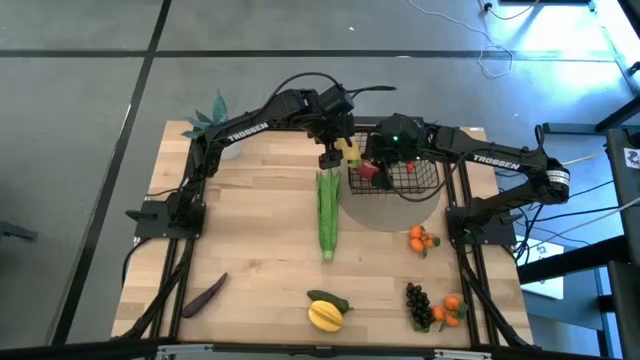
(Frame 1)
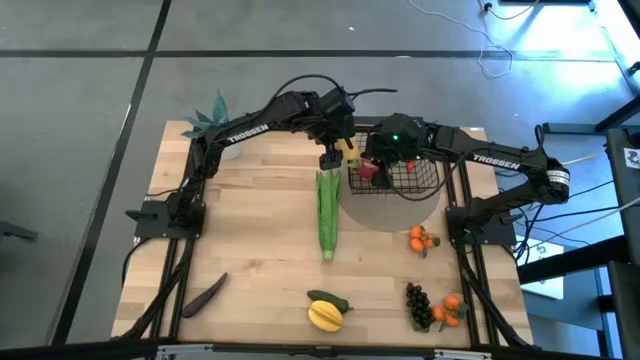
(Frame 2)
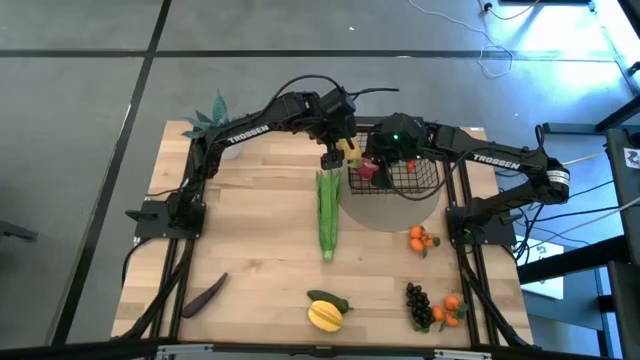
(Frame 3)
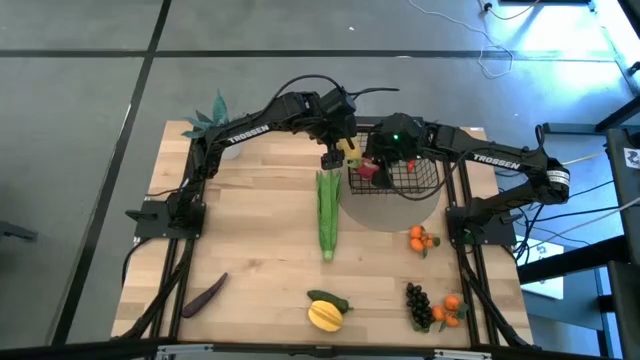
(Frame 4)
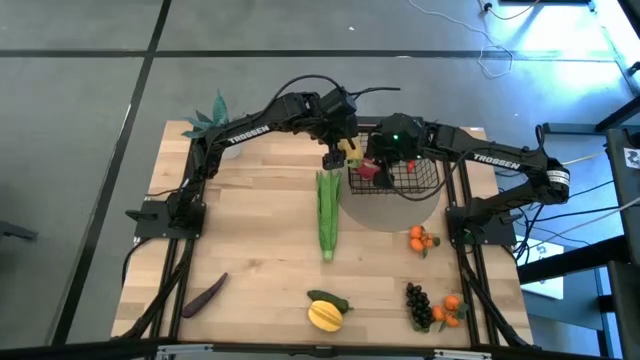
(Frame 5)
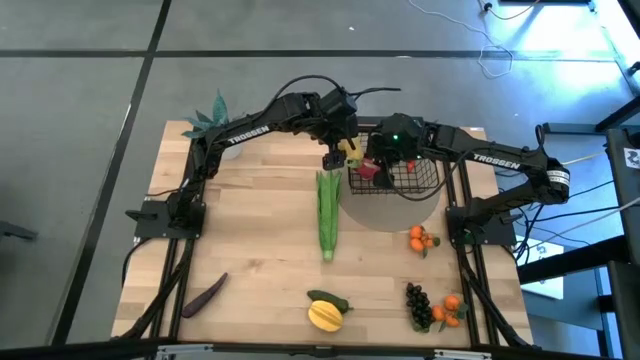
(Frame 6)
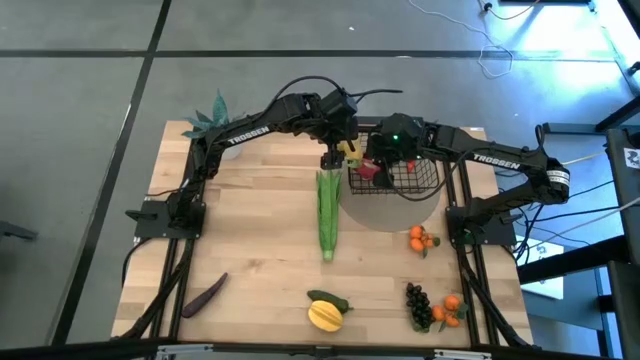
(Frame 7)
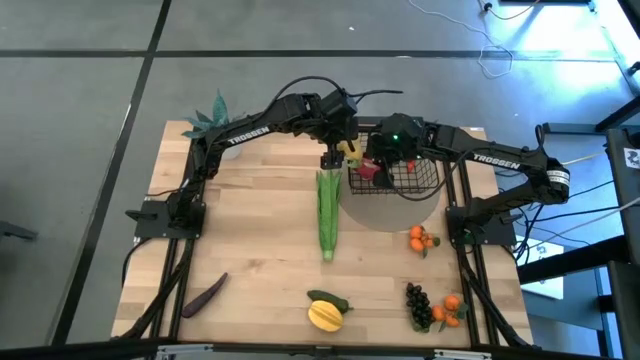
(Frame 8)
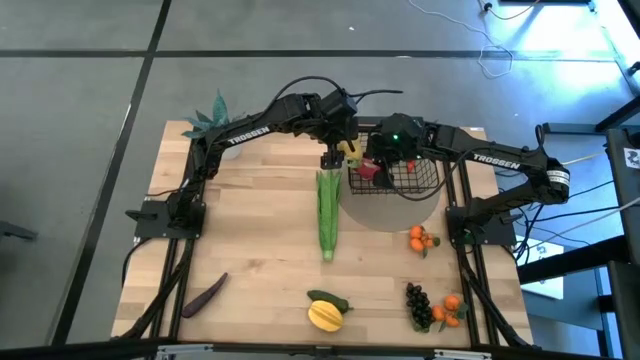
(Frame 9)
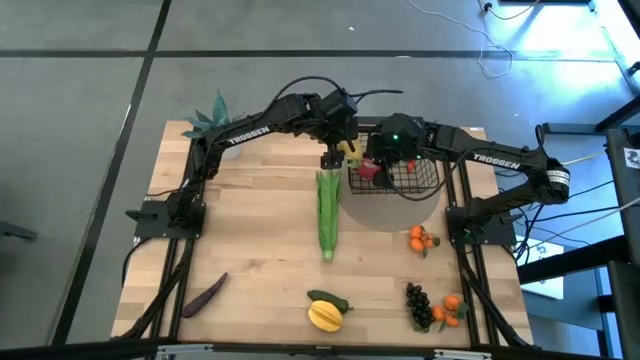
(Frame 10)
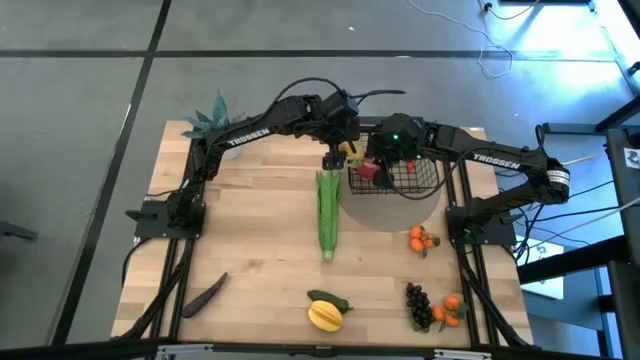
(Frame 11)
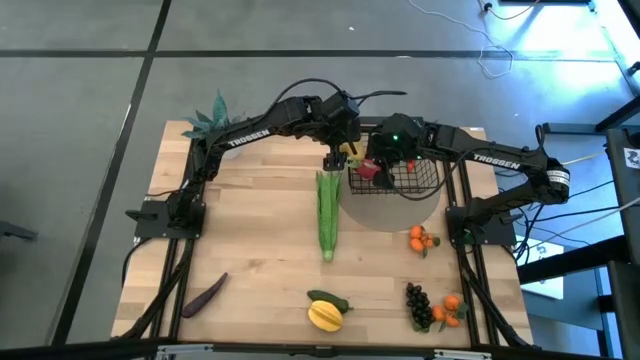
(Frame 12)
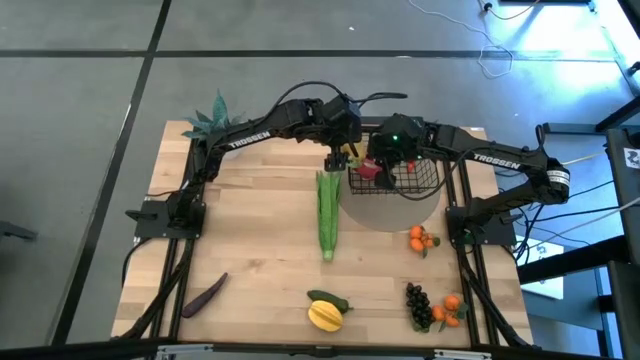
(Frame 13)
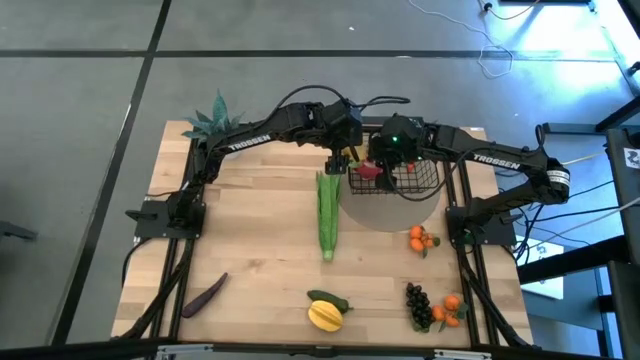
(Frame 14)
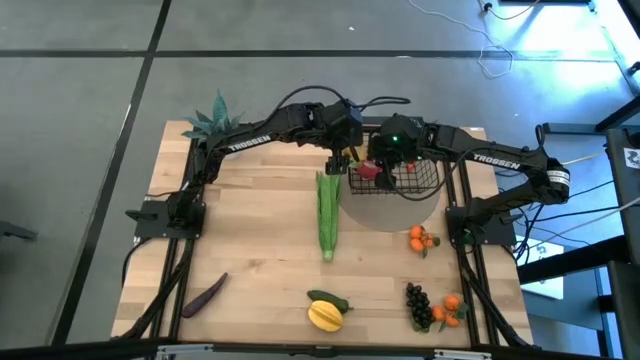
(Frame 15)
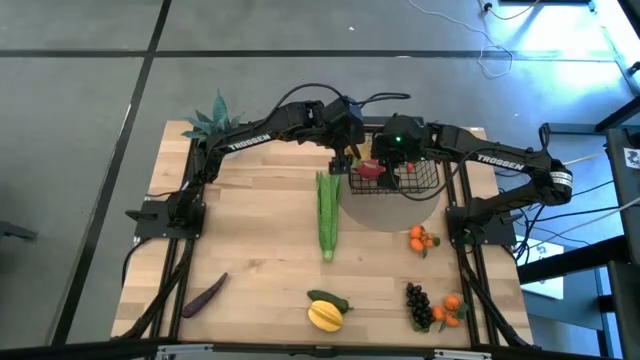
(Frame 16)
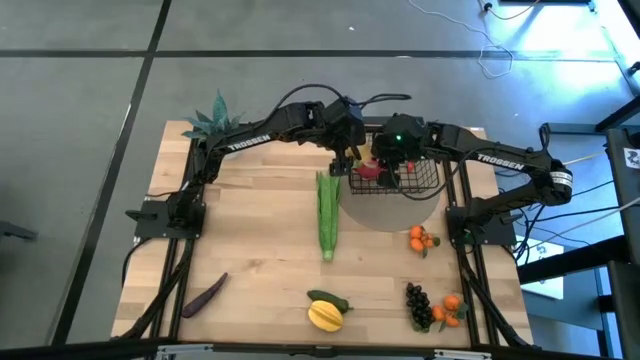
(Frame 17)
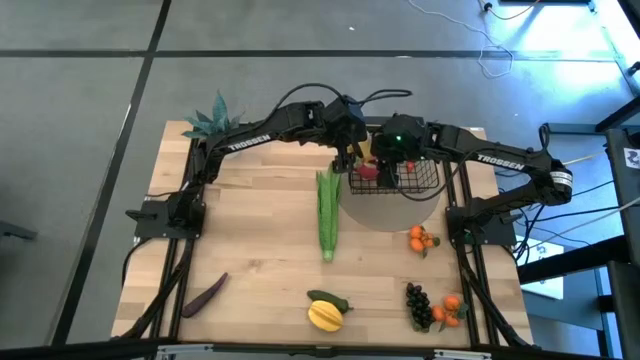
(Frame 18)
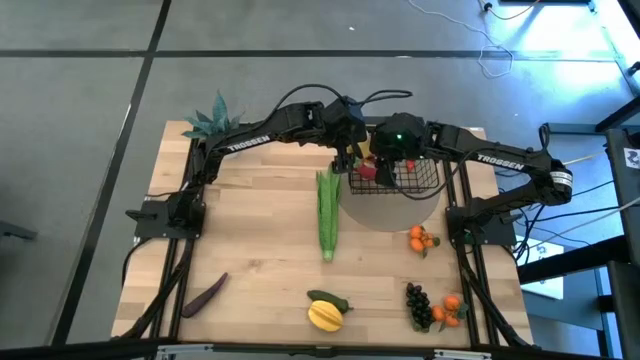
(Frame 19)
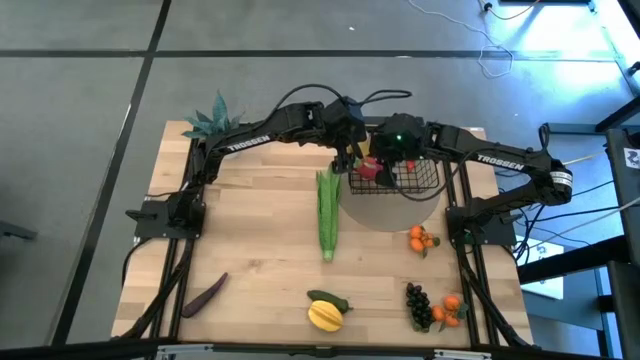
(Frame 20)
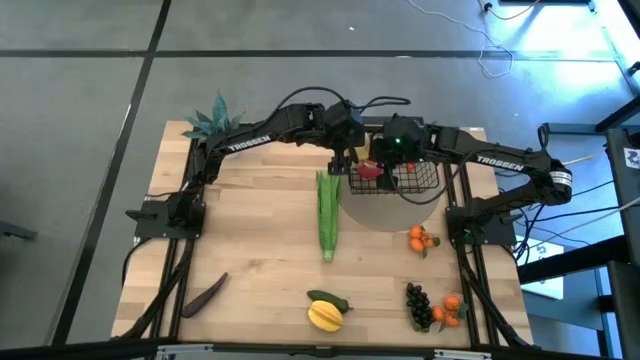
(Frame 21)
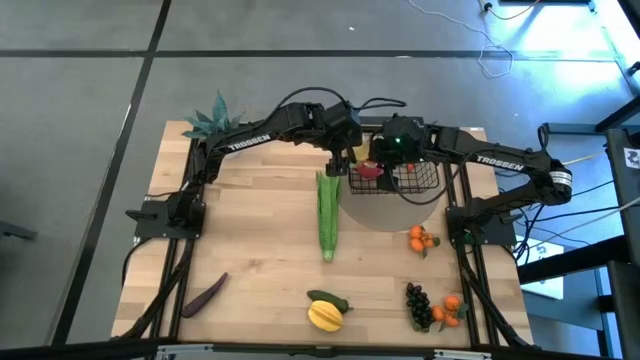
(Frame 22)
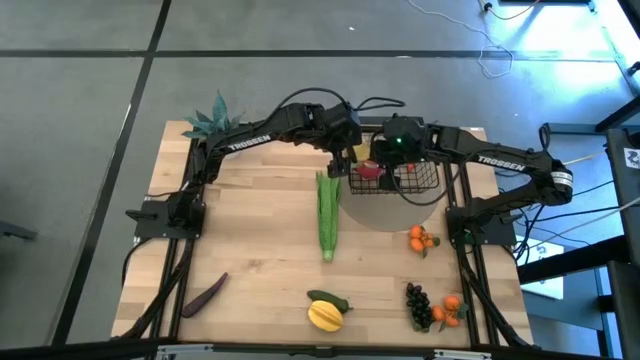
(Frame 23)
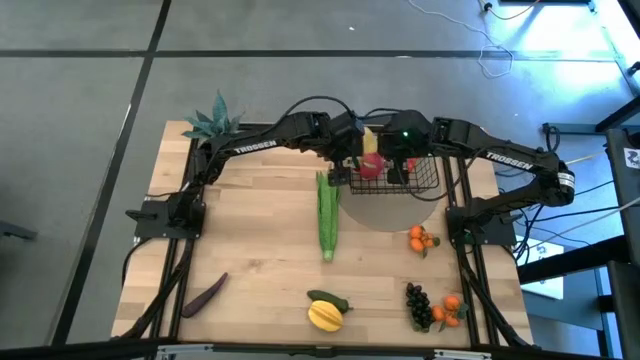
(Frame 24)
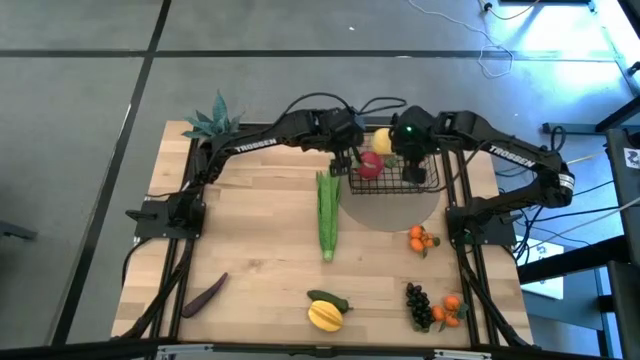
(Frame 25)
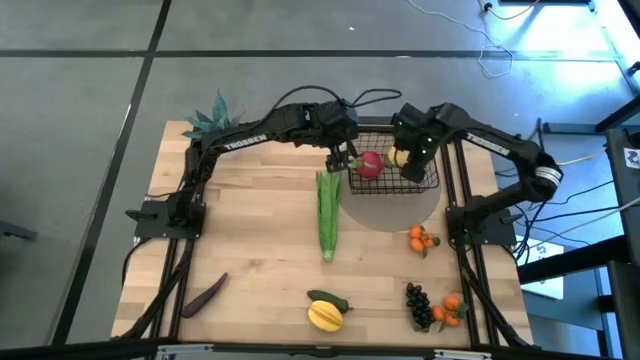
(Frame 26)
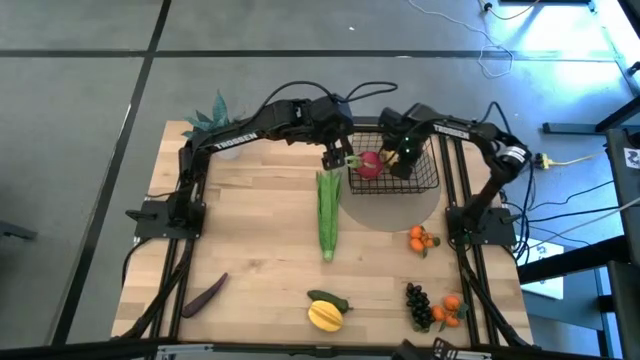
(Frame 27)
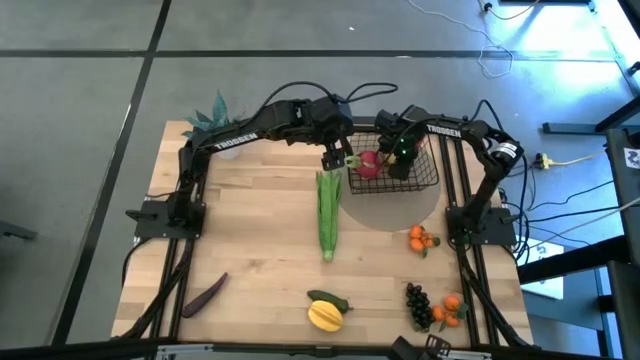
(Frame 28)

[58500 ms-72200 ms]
Task: Build produce basket
Put the pear into the black wire basket

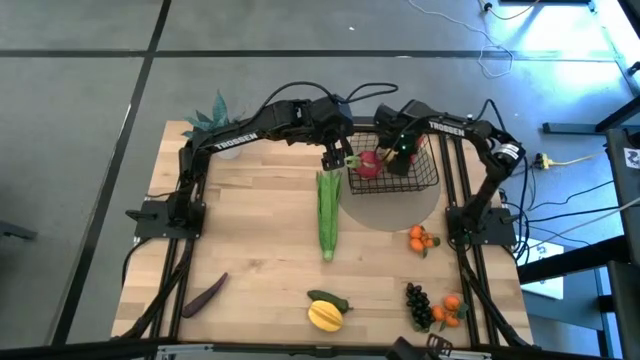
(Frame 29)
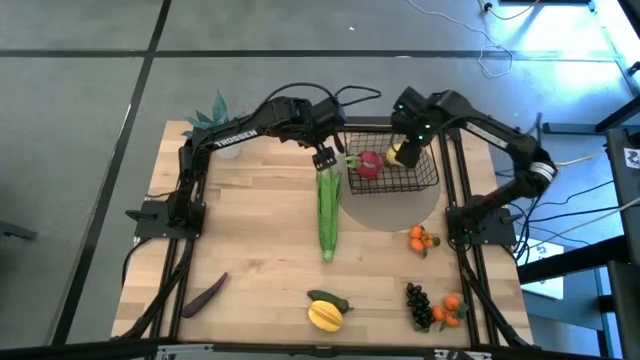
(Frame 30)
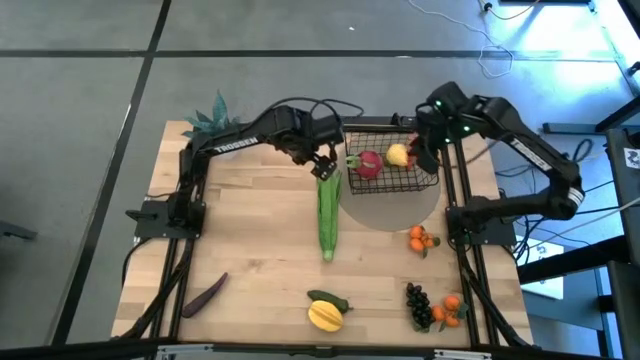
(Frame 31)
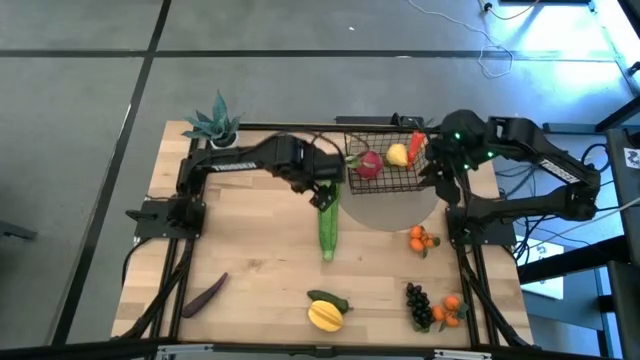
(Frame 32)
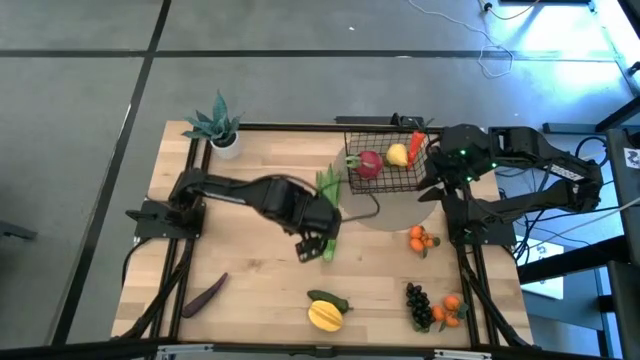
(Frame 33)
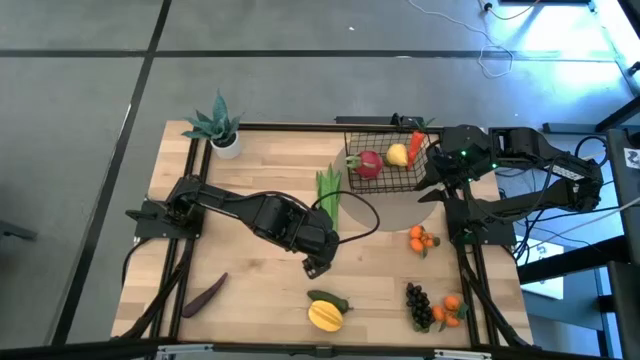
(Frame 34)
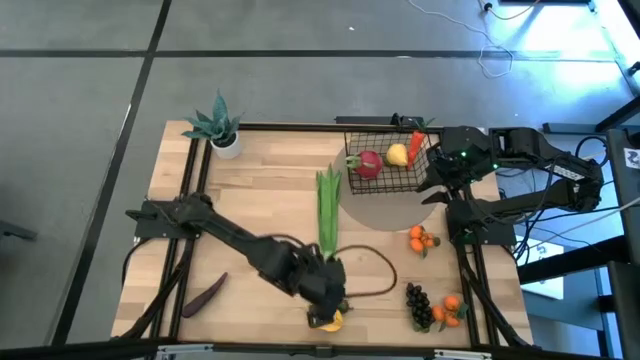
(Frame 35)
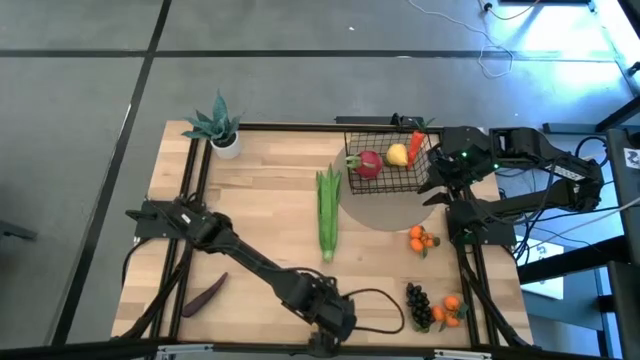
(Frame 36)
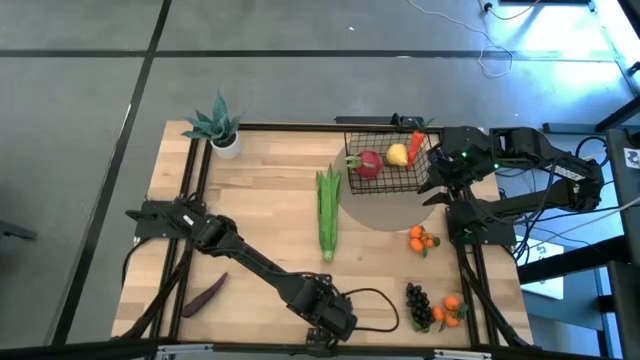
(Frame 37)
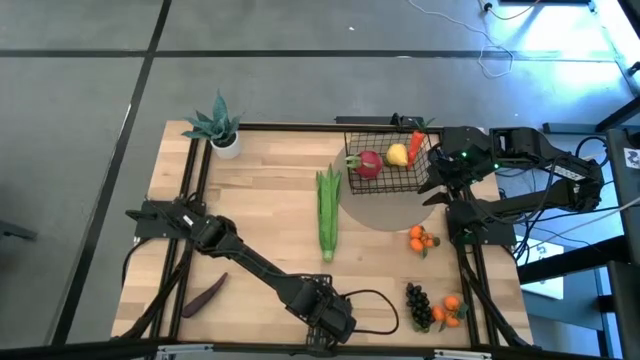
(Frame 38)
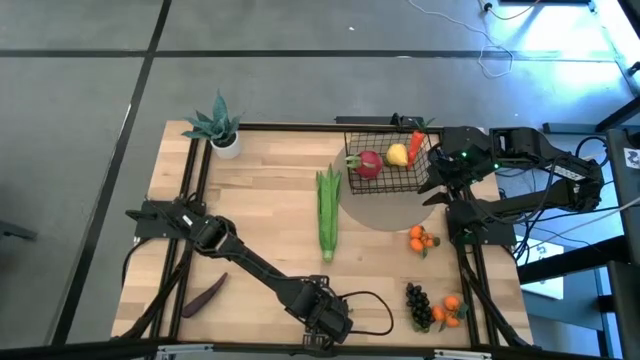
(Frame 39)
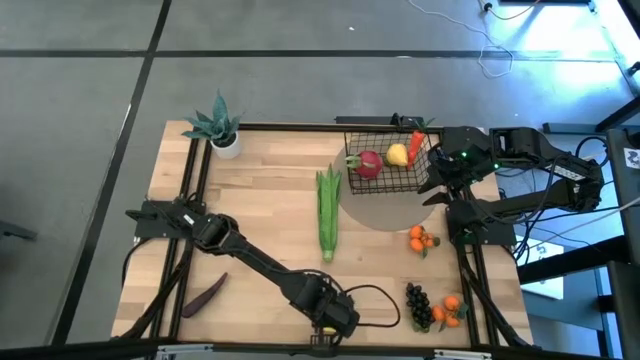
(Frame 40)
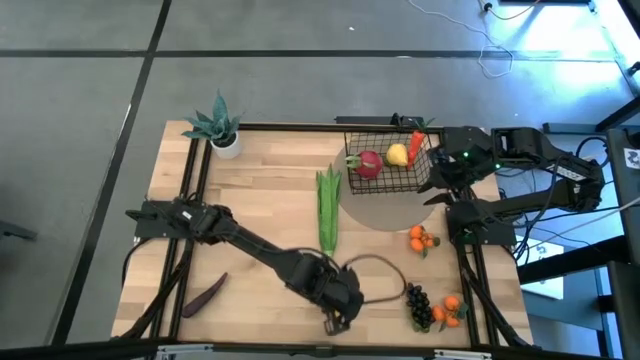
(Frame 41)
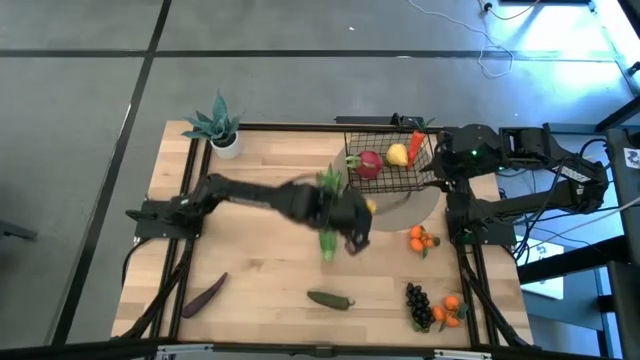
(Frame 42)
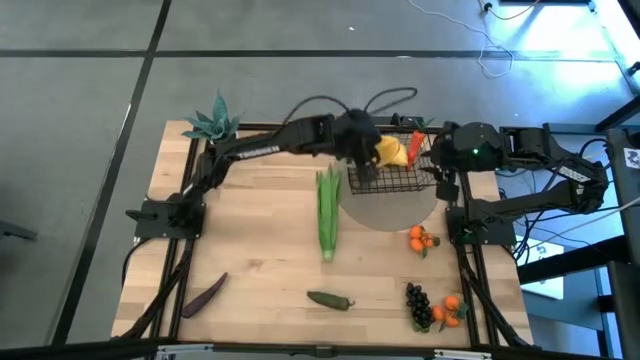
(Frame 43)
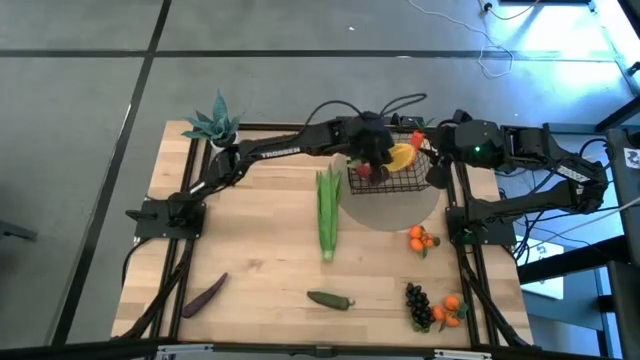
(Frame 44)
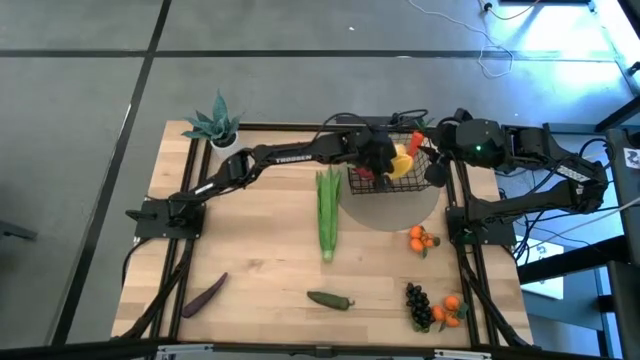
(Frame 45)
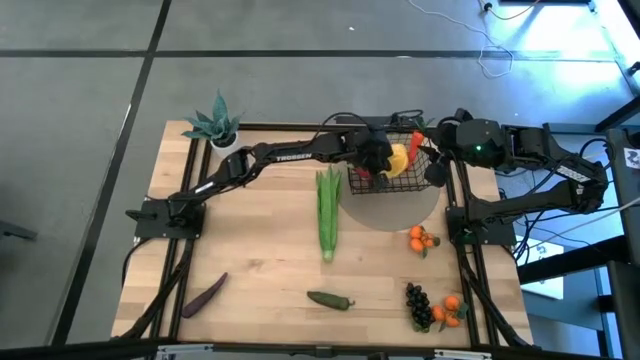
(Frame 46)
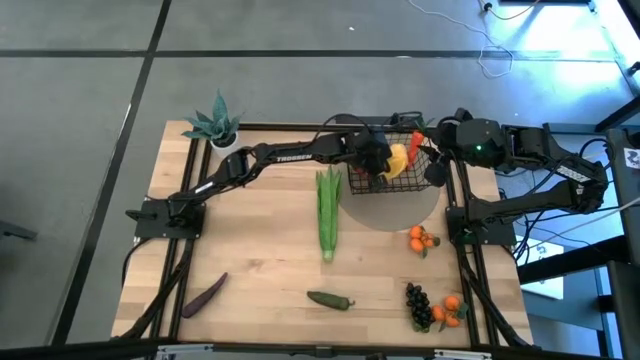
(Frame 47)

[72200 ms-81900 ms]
Put the starfruit into the black wire basket
